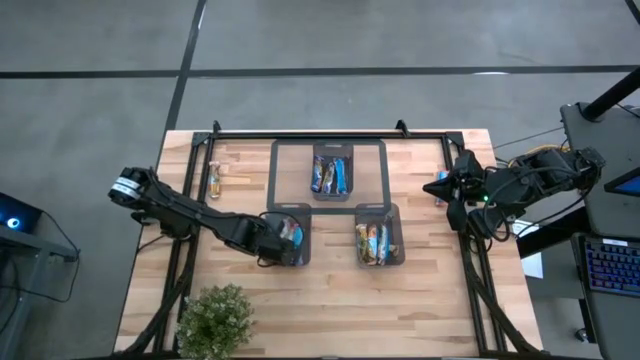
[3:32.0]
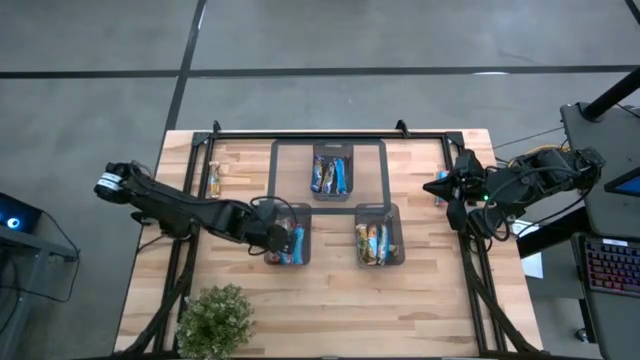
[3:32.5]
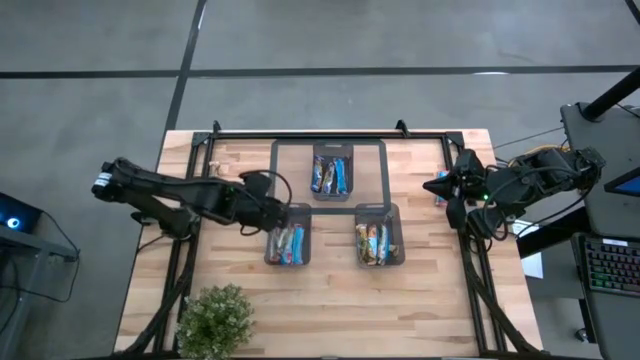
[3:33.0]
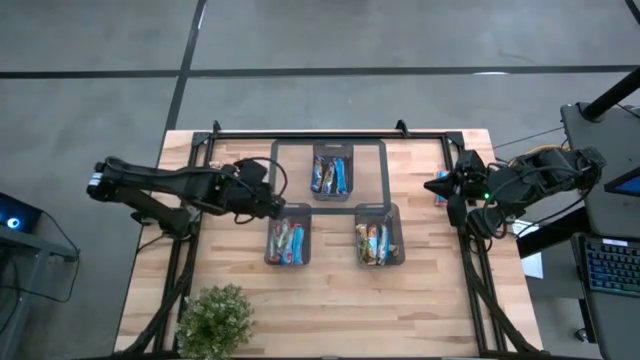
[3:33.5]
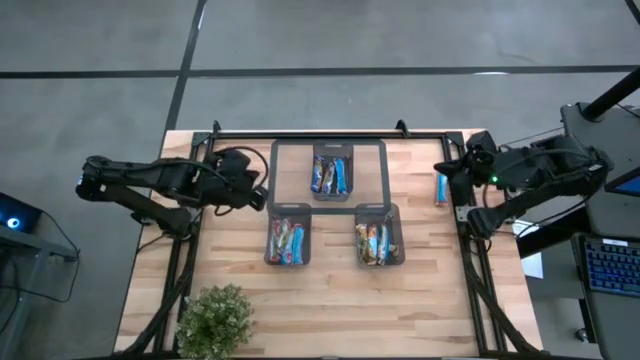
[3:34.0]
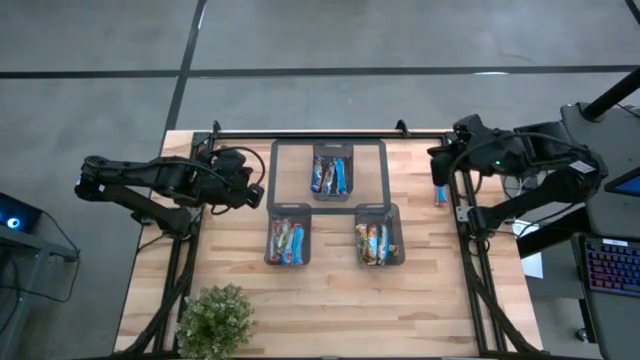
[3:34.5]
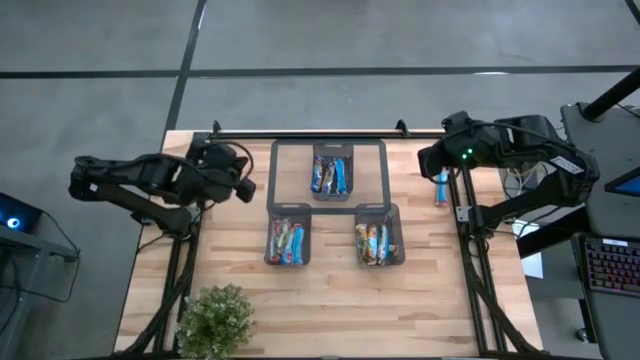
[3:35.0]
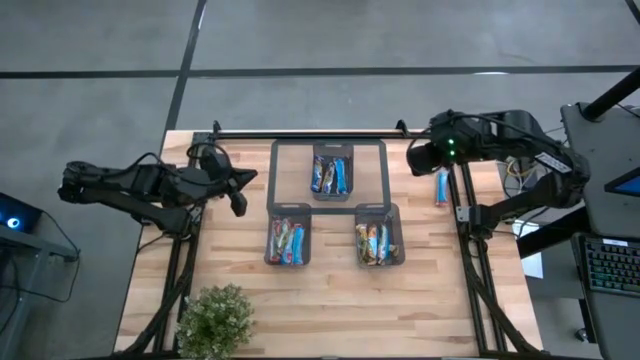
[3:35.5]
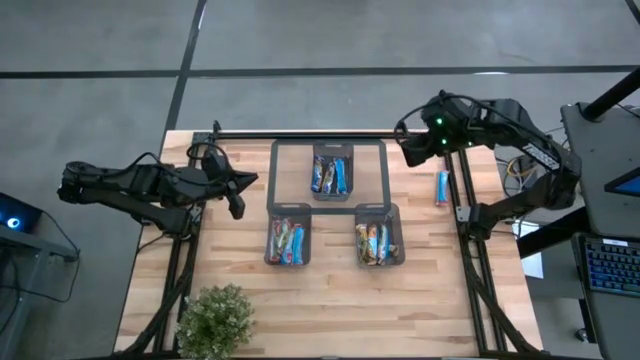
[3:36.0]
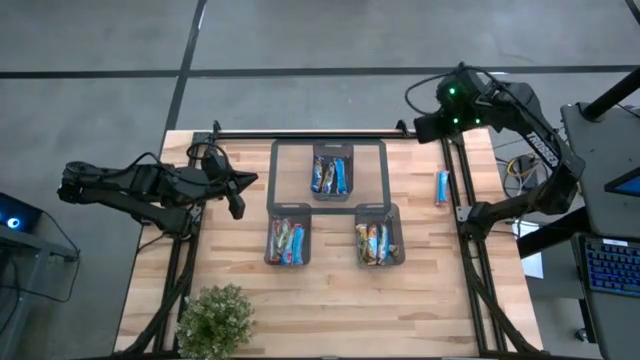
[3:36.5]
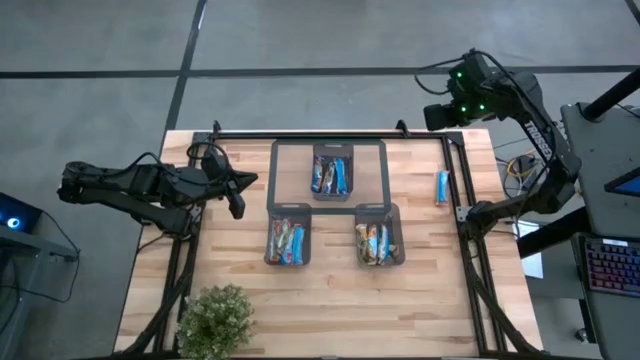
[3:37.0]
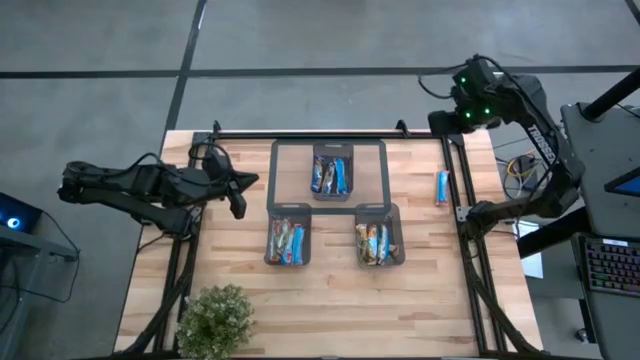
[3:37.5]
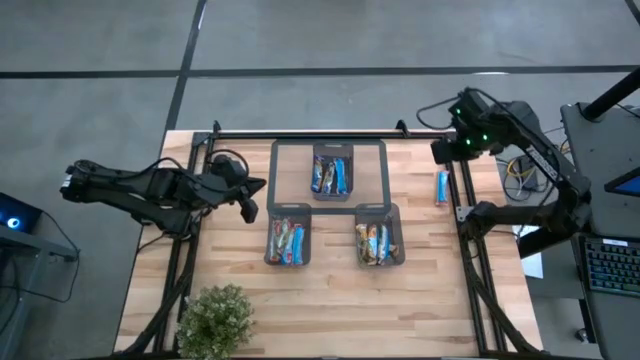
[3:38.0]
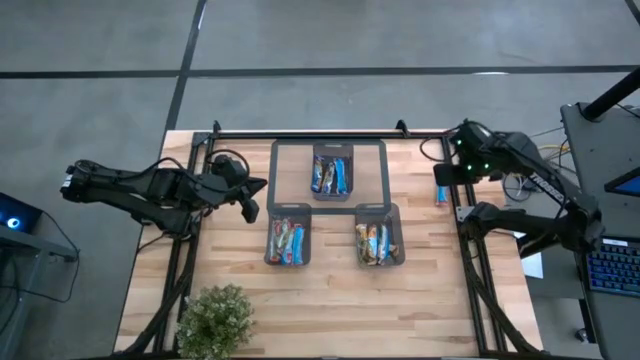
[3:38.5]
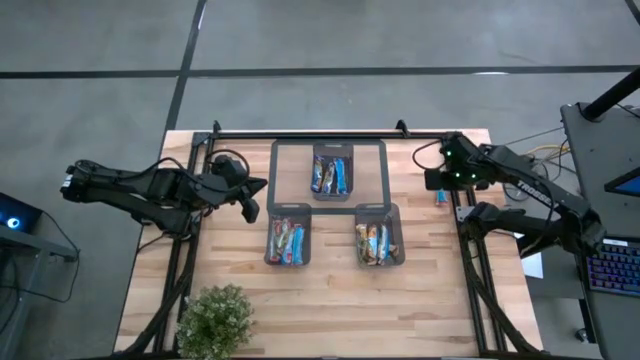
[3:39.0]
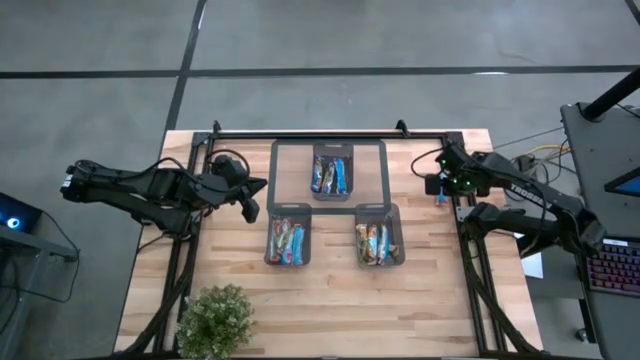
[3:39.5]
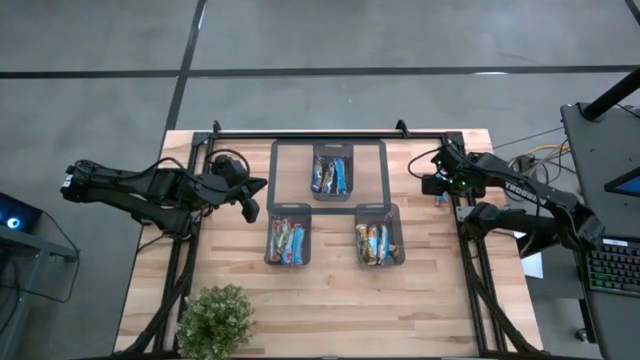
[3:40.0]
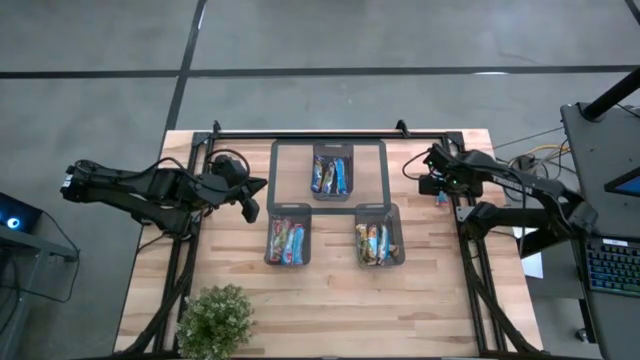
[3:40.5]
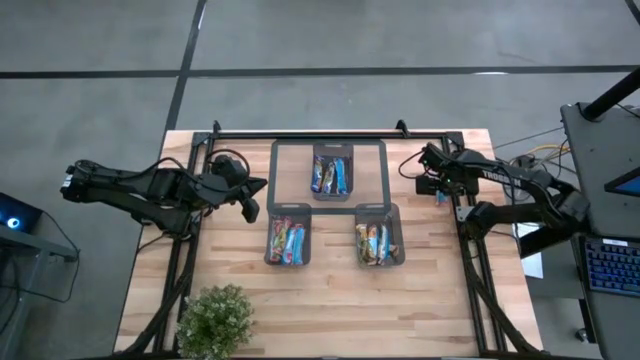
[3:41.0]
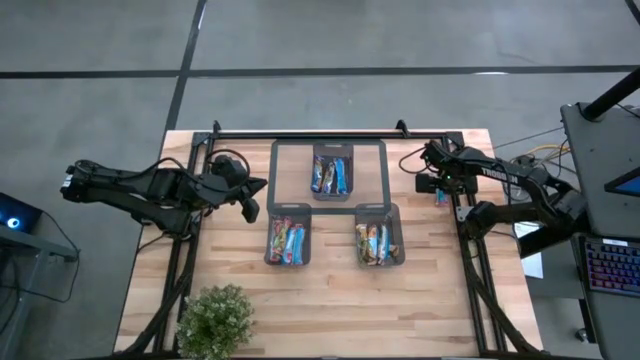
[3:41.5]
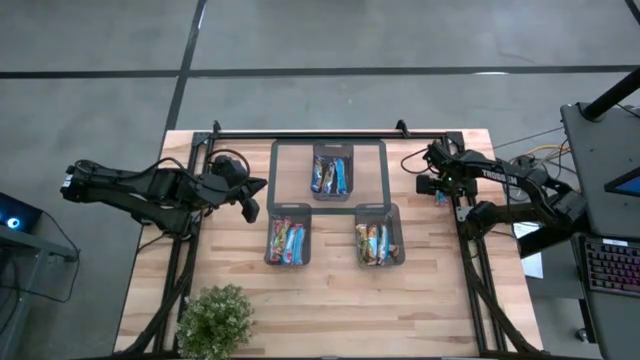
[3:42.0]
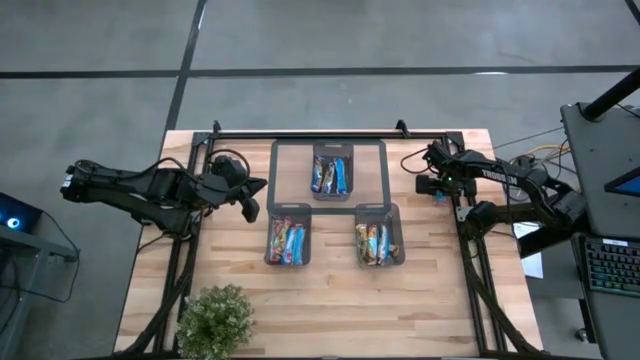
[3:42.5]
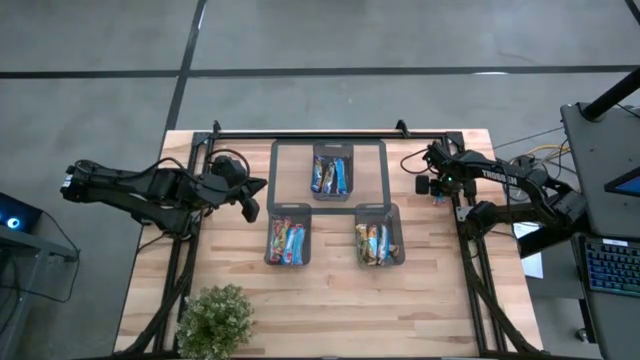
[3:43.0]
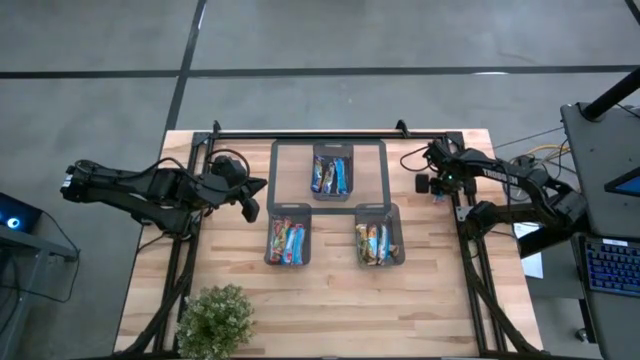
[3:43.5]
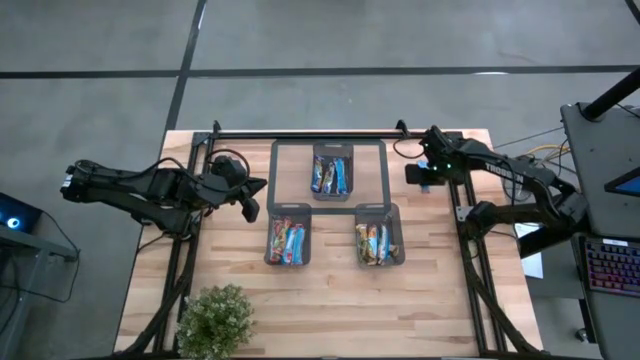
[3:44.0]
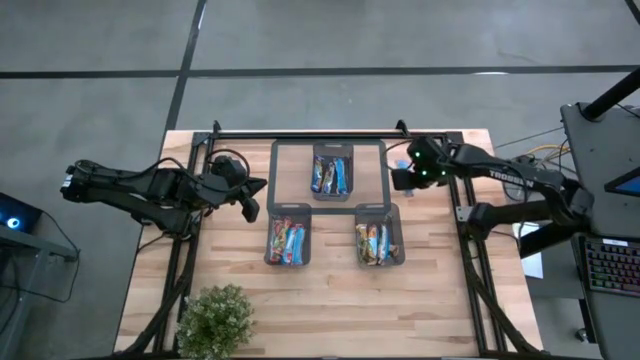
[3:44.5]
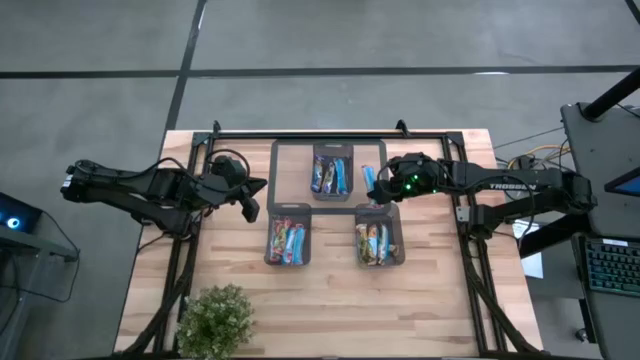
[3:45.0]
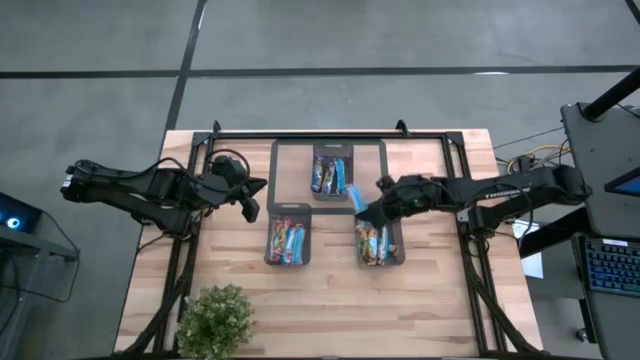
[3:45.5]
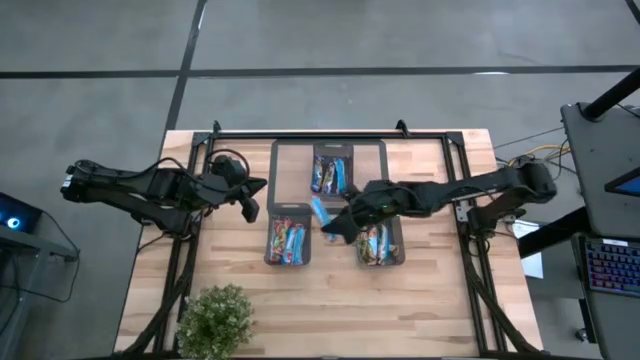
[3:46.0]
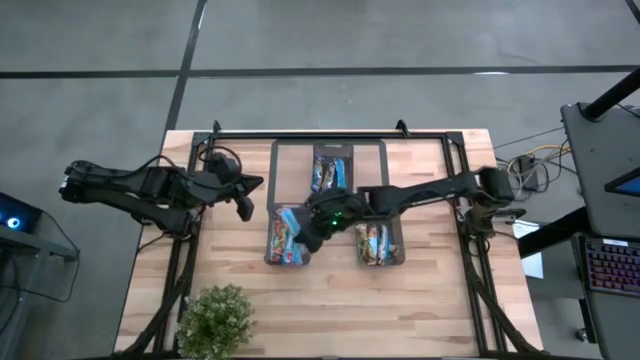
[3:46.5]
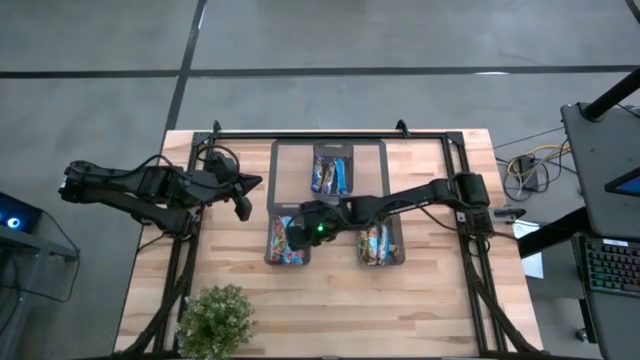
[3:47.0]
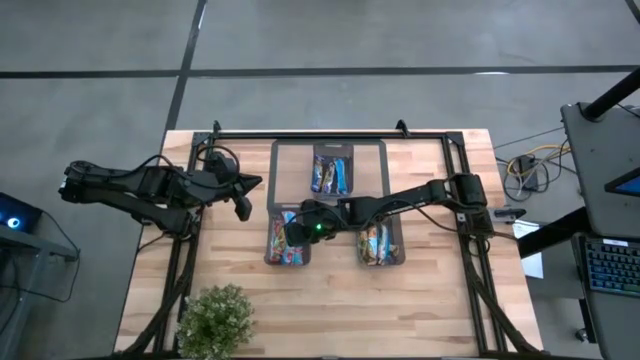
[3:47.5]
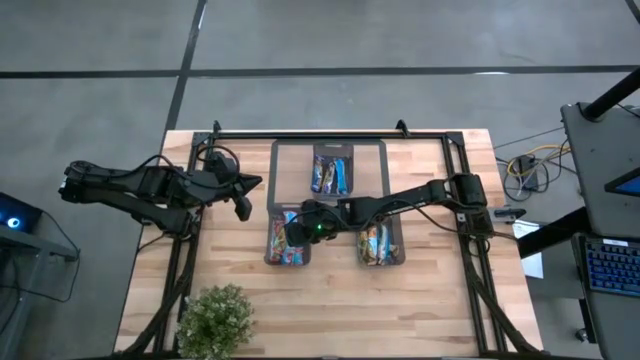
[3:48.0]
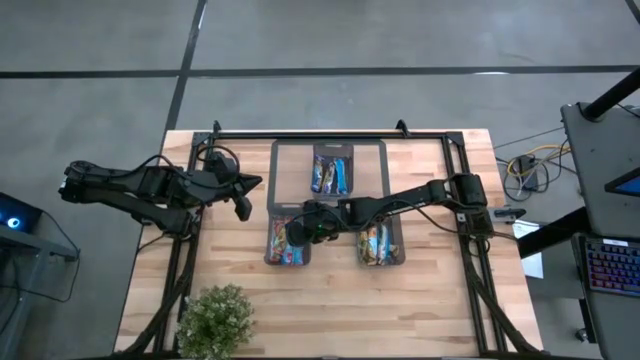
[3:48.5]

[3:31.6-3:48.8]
Task: Pick and place Granola Bars by type
Put the red granola bar into the bottom left black bin

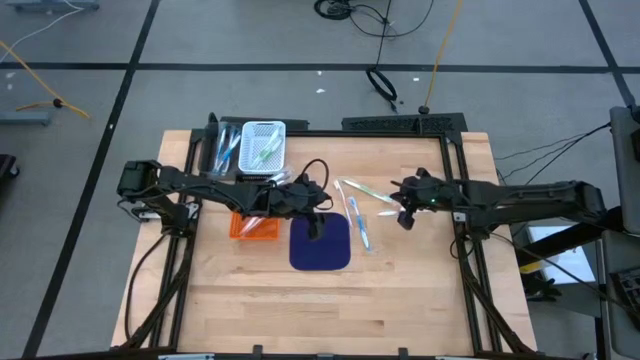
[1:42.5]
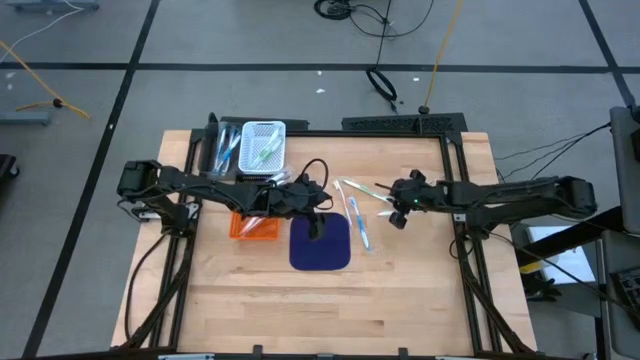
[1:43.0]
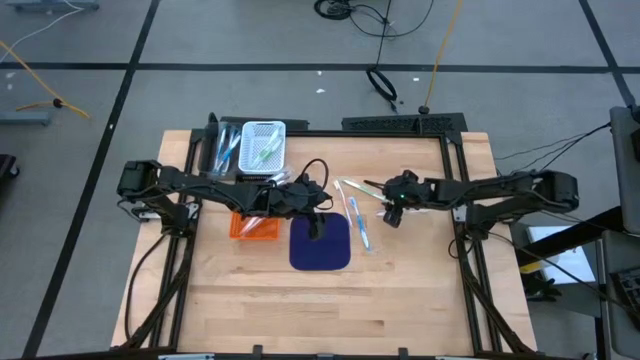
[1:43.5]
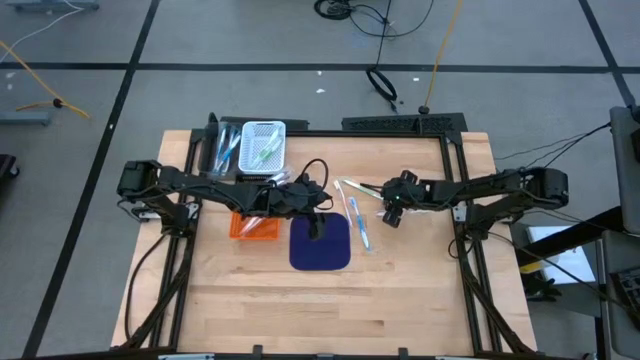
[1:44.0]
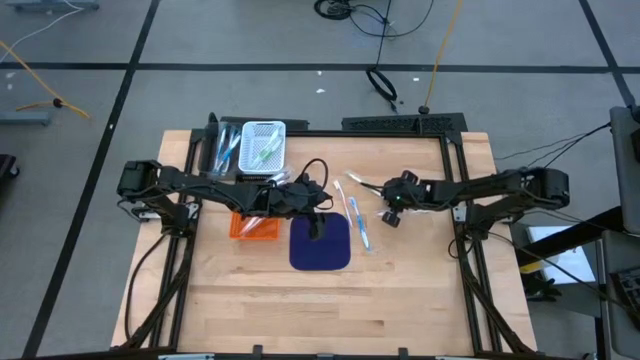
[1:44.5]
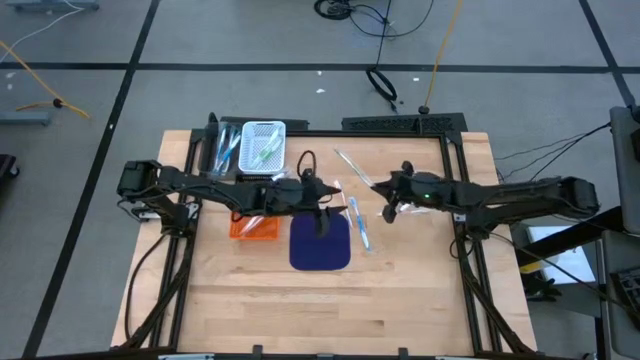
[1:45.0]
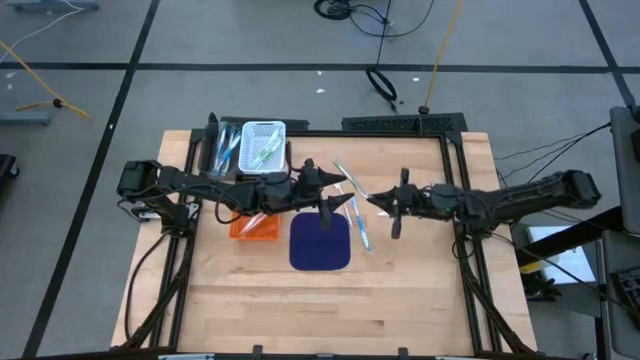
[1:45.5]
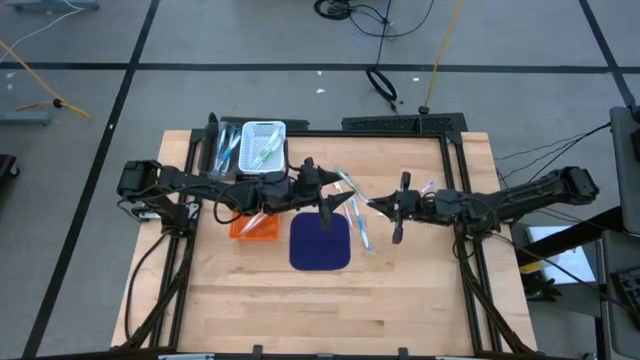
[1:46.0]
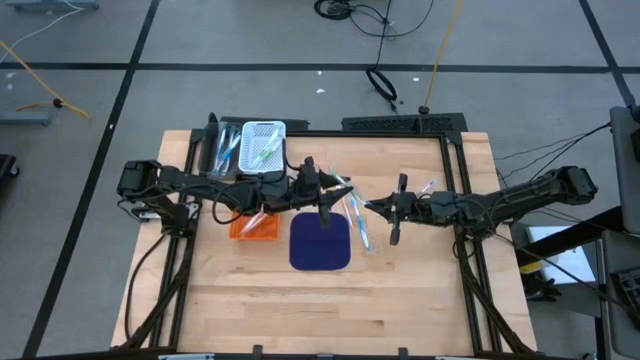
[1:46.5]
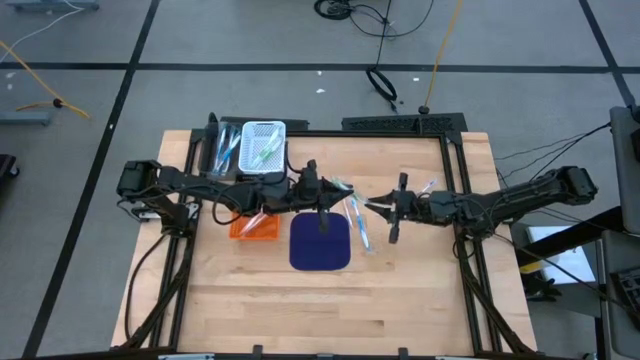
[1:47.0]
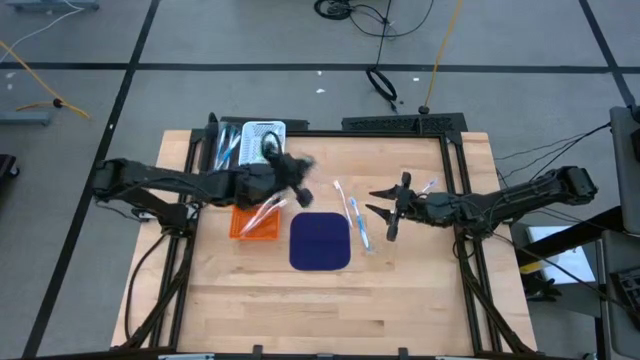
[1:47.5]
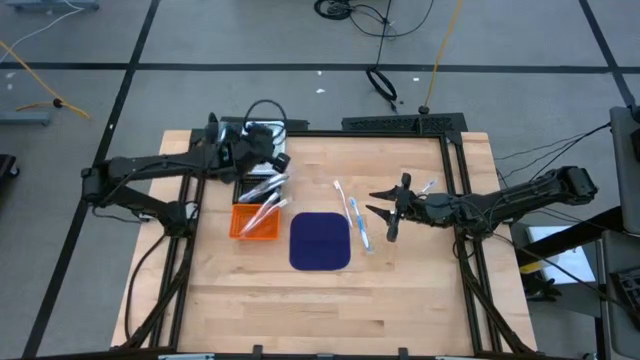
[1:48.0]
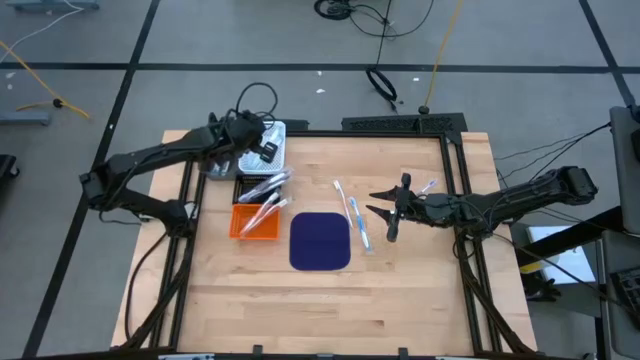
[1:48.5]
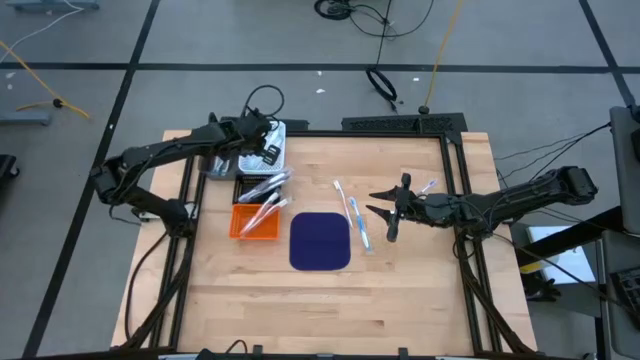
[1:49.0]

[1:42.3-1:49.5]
Task: Pick & Place Toothbrushes
Put the green toothbrush into the white bin
